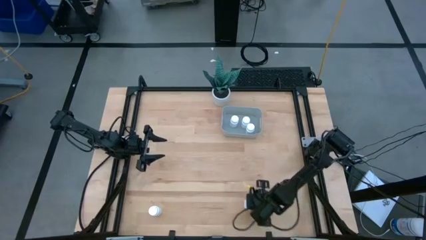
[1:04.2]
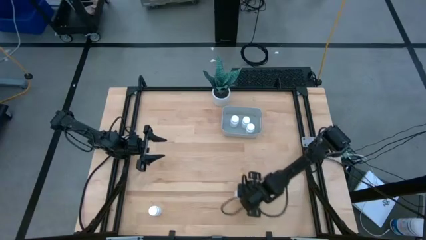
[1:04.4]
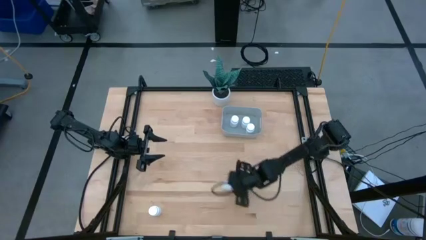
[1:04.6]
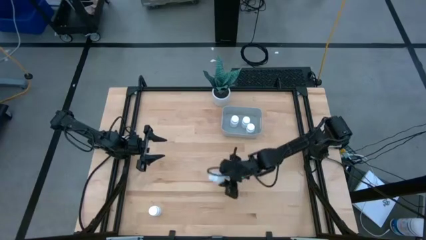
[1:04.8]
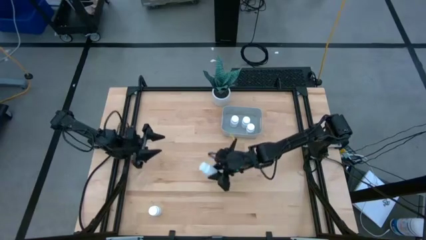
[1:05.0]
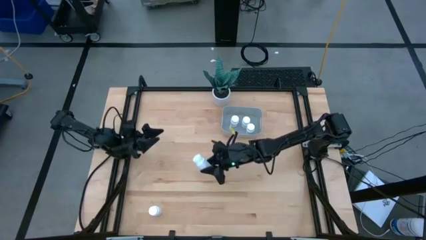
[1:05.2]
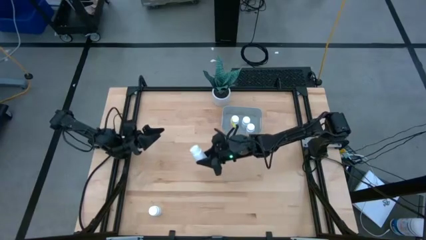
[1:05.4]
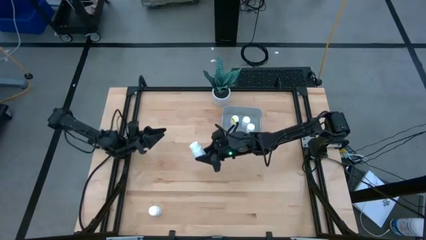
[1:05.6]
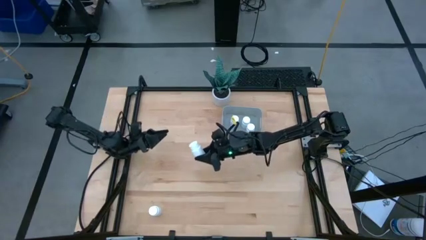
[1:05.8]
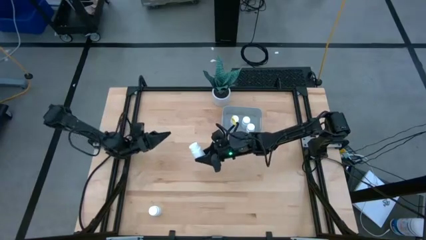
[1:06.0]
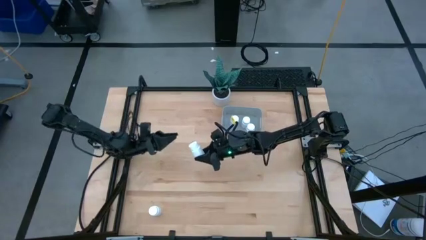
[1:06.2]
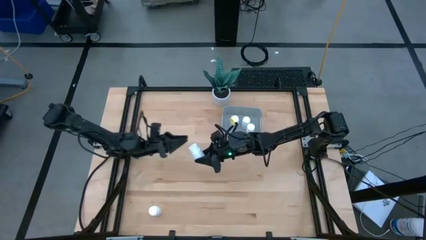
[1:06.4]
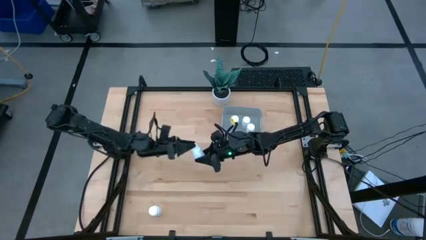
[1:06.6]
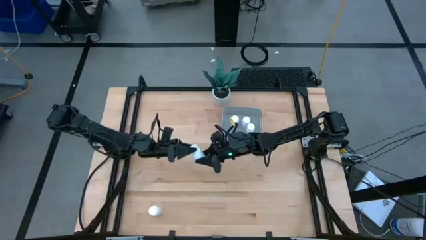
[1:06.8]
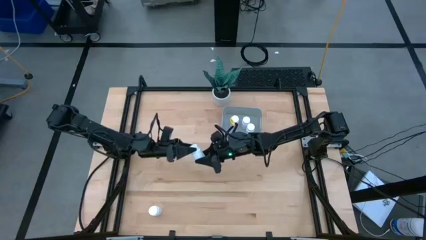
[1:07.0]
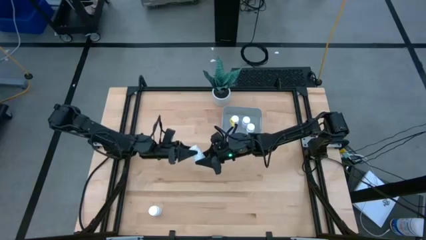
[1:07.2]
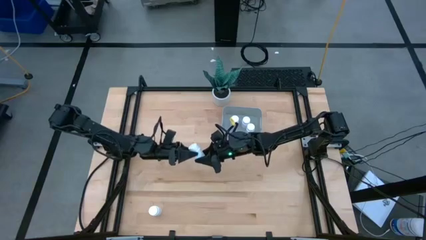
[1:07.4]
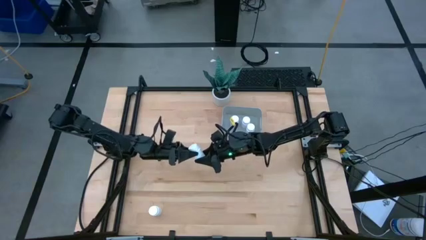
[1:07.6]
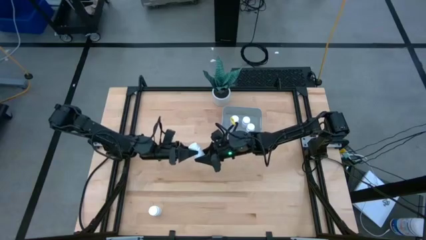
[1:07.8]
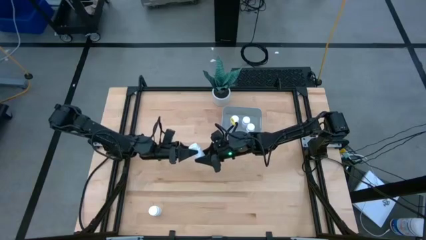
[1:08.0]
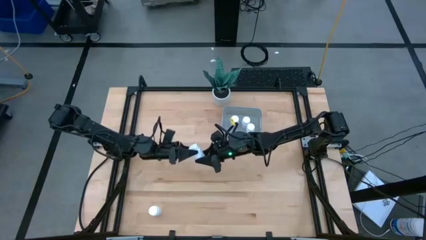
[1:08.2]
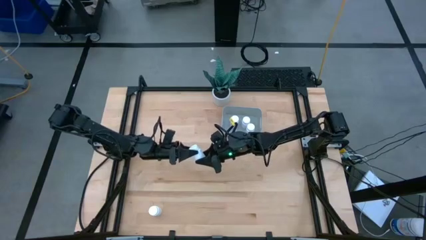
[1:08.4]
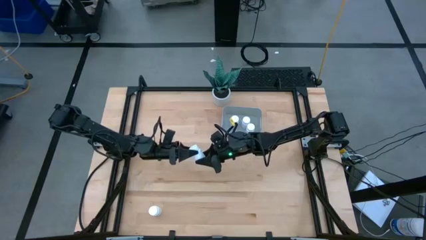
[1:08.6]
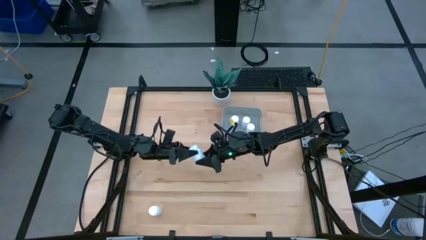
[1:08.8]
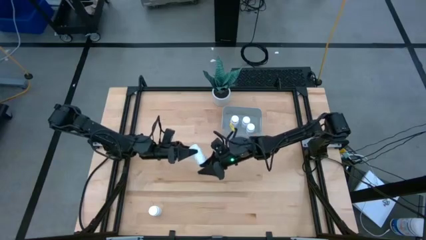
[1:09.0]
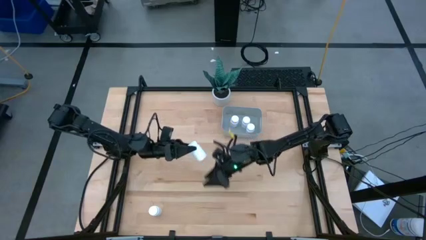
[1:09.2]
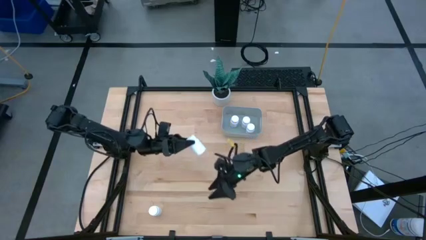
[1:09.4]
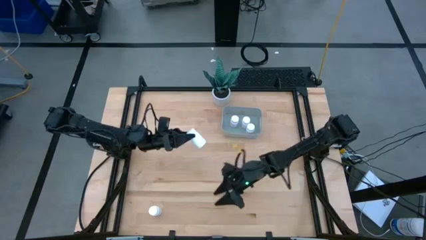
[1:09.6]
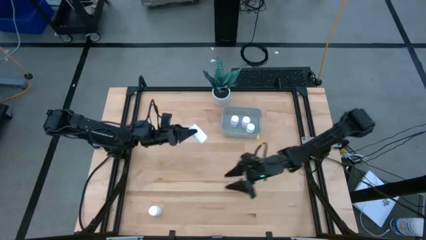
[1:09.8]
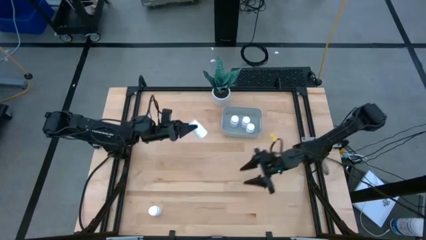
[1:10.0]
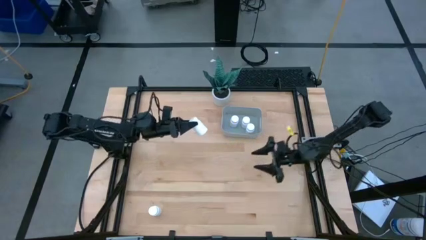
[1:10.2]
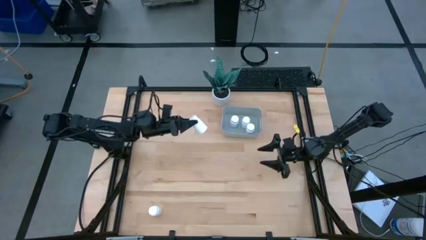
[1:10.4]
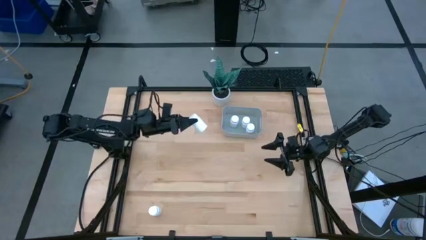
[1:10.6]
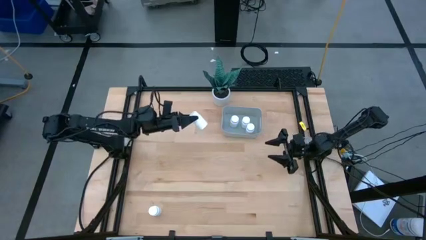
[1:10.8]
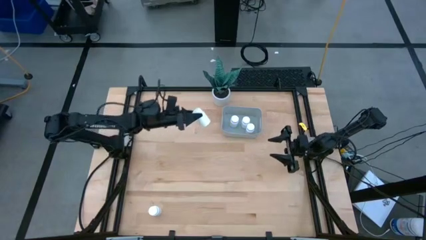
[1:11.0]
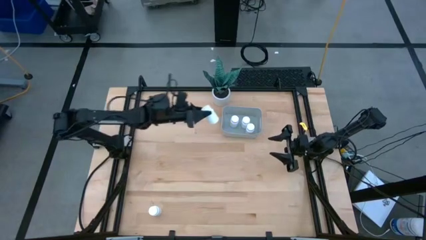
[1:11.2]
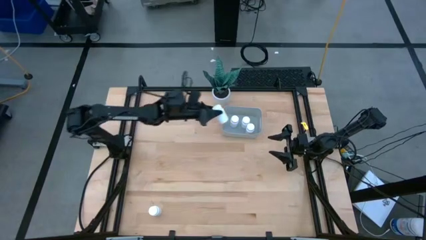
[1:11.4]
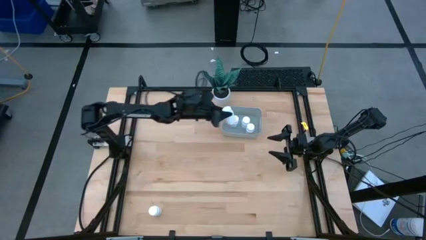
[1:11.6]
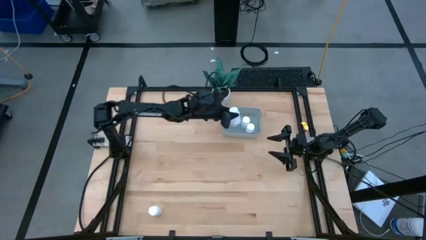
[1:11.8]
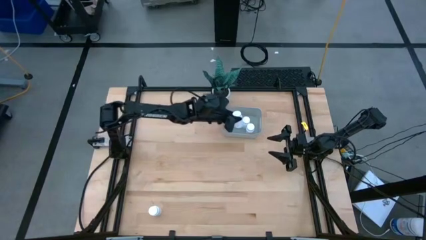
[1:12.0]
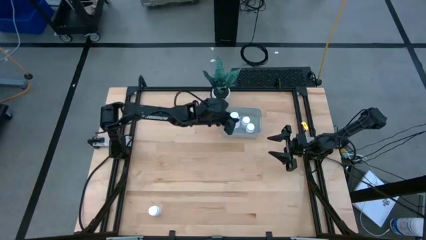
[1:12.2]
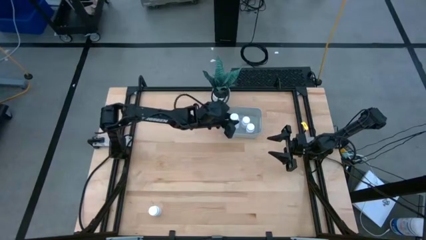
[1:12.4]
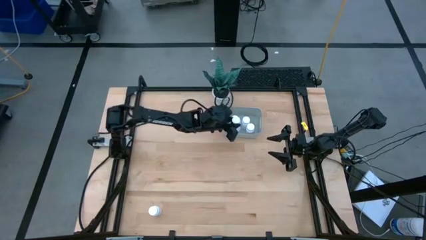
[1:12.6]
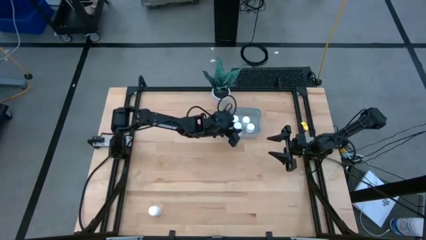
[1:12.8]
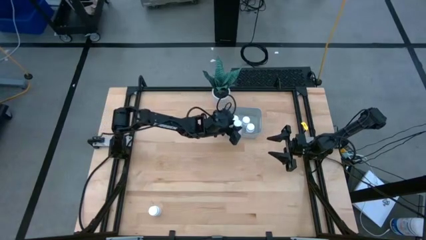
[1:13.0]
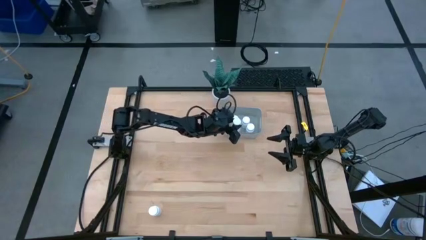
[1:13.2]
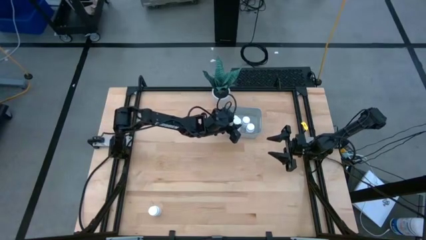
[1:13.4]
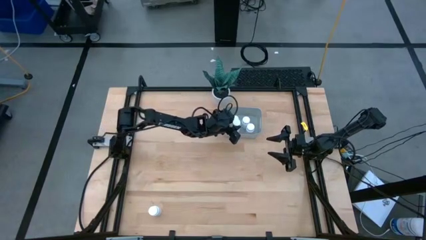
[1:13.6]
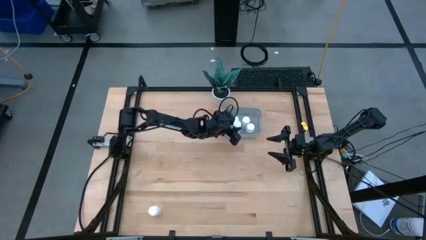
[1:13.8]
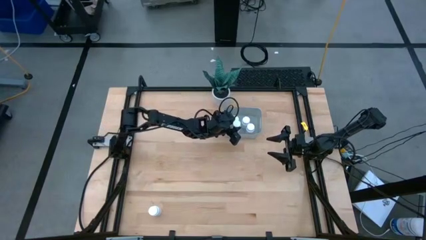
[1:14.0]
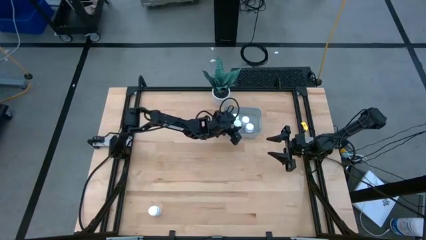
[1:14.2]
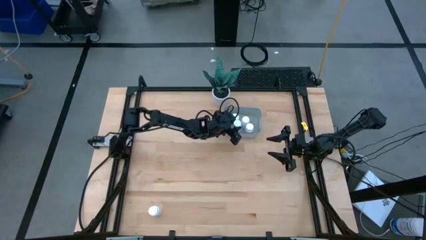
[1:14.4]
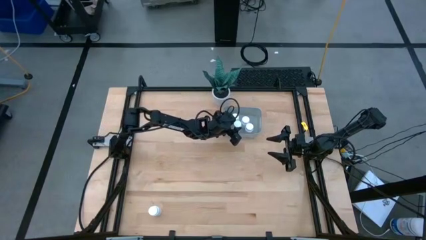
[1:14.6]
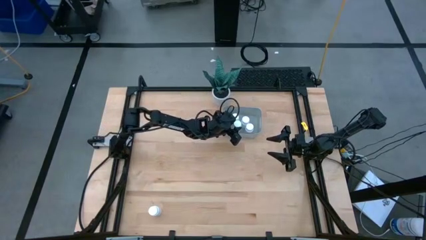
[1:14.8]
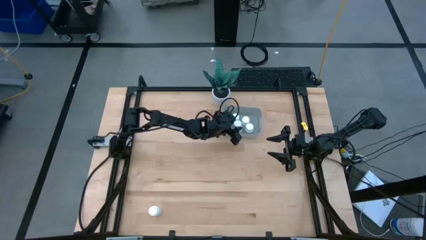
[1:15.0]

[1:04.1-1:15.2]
Task: Pick and place pill bottles into a basket
Put the white pill bottle into the gray bin

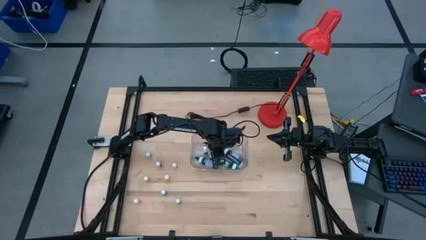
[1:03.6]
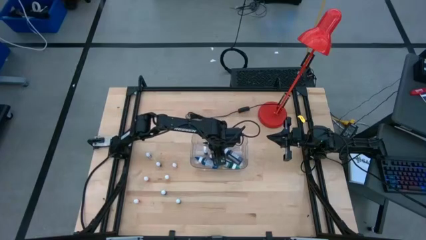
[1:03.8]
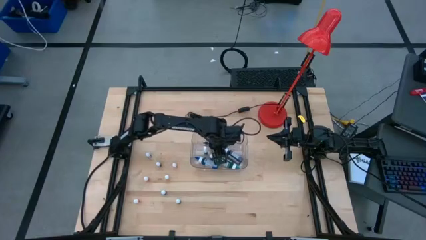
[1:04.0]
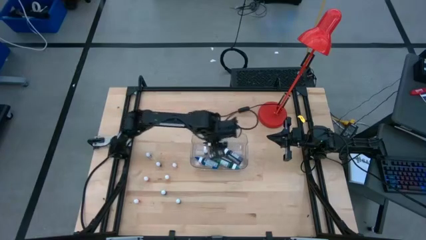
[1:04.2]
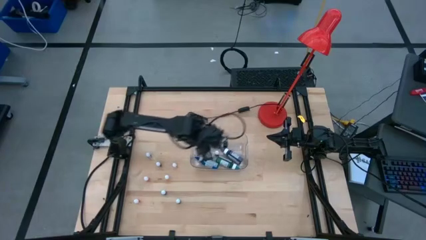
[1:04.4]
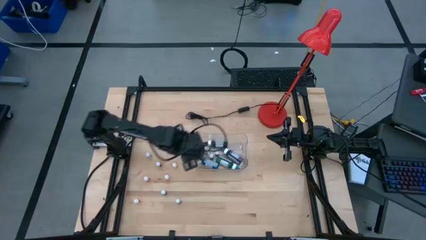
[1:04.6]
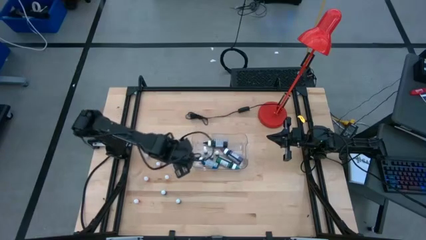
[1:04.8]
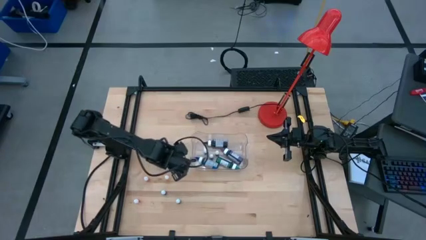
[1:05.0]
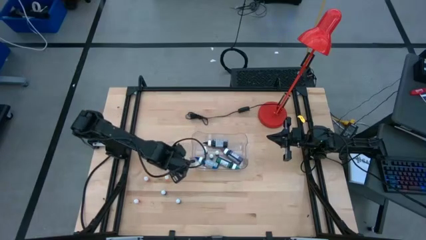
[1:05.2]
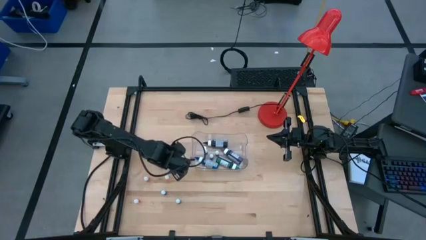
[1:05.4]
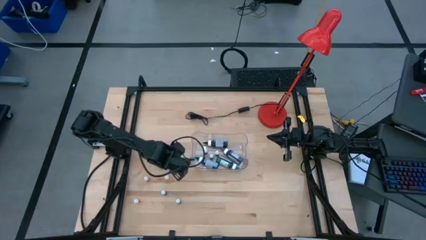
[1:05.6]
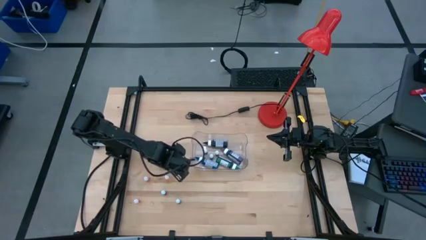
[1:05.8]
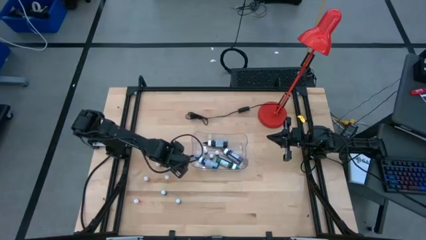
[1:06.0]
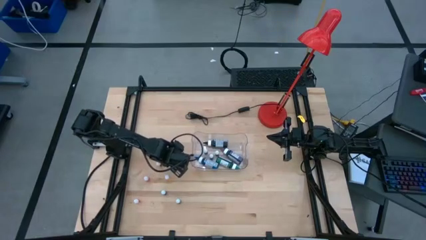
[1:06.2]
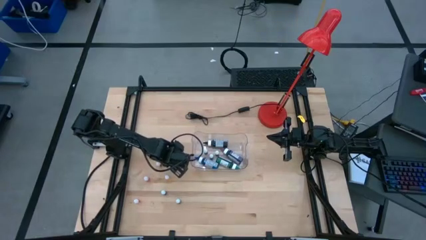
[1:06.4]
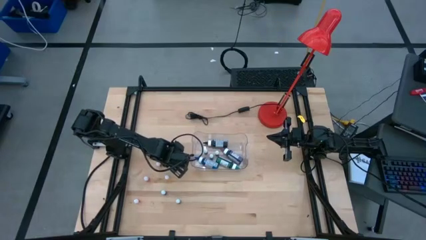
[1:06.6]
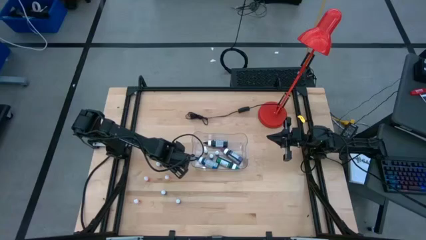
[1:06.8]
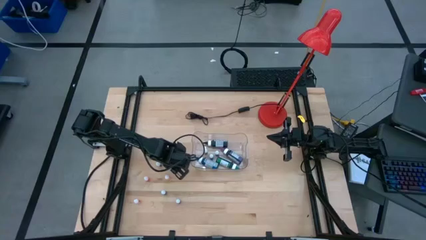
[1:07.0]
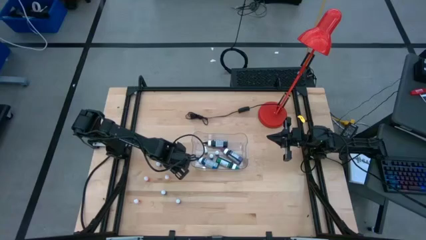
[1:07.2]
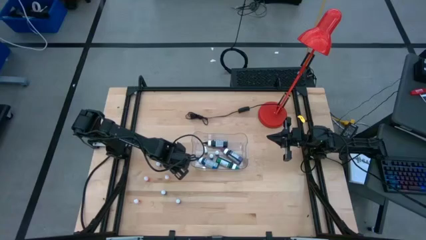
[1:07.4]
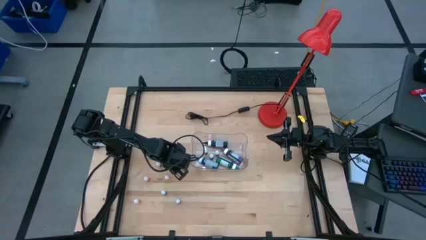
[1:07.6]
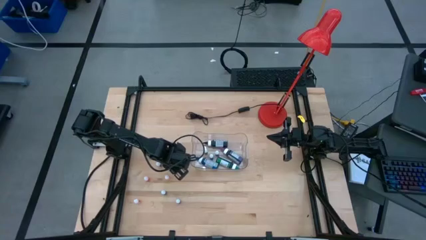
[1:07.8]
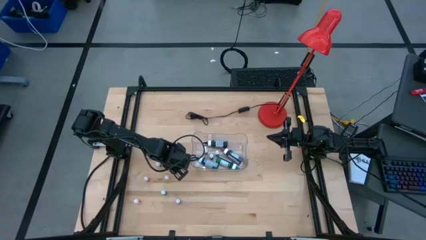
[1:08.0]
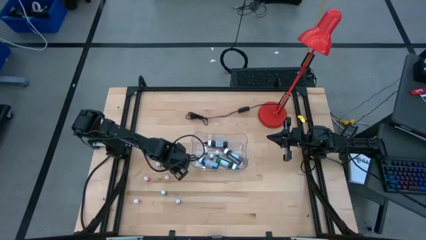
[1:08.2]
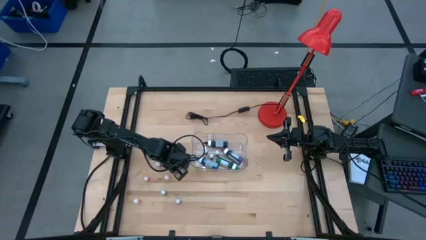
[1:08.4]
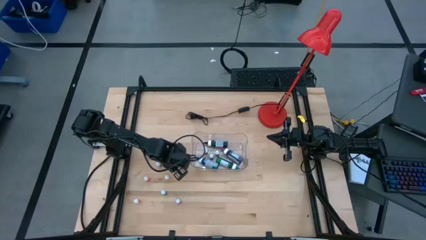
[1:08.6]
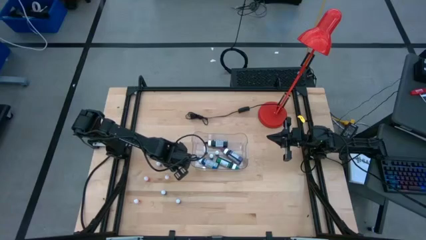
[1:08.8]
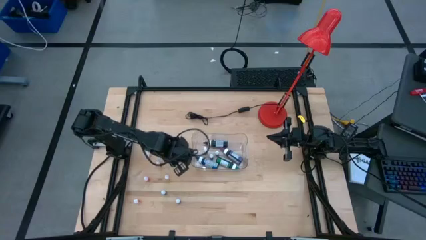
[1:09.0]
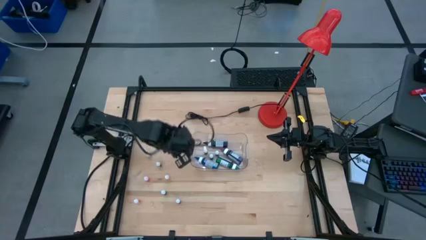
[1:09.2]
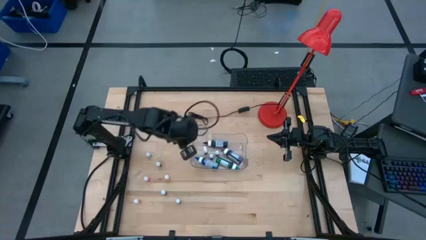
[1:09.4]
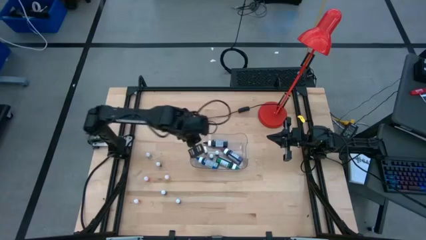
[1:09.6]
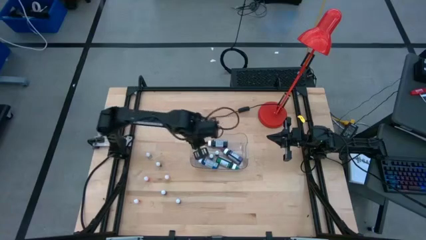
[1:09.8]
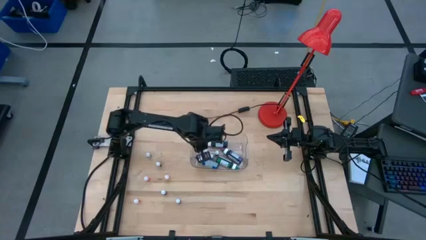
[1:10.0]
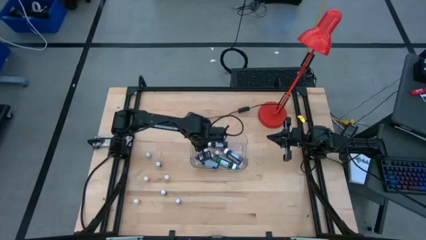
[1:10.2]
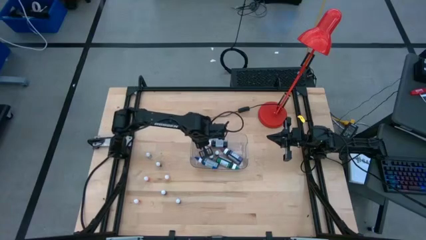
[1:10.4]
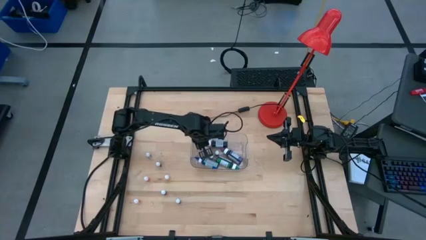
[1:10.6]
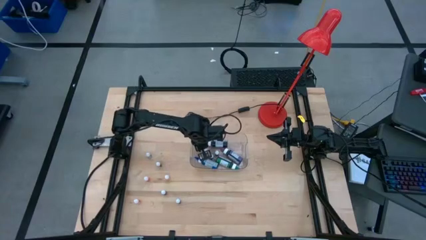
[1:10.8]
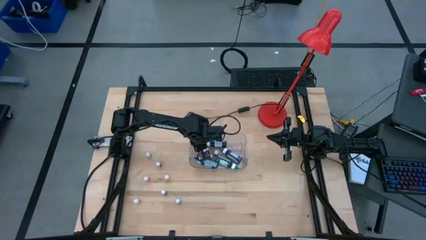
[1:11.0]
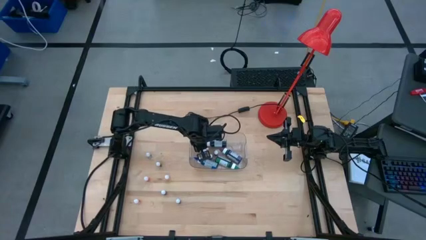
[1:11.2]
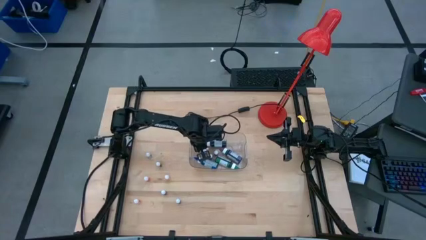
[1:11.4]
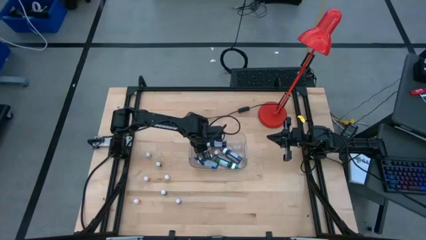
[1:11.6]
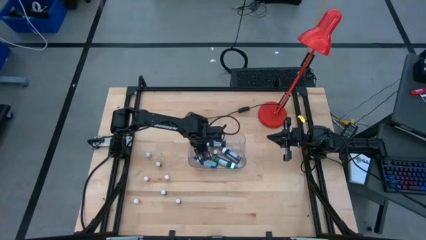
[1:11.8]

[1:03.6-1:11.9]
Task: Pick & Place food coloring
Put the small orange food coloring bottle into the transparent bin
